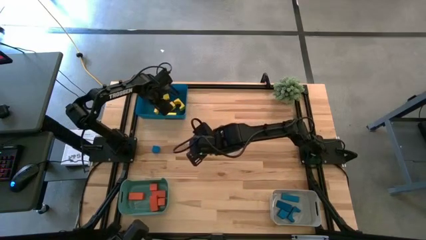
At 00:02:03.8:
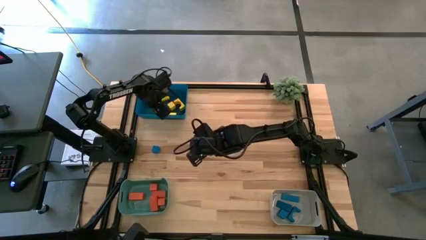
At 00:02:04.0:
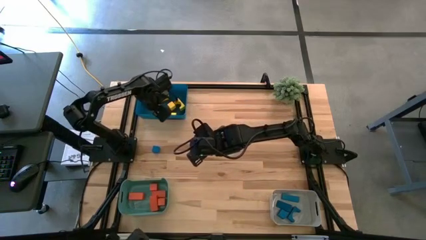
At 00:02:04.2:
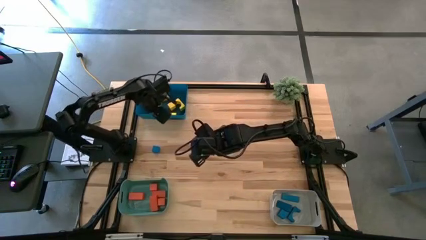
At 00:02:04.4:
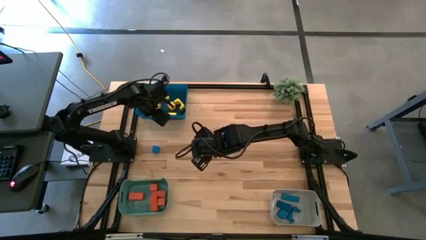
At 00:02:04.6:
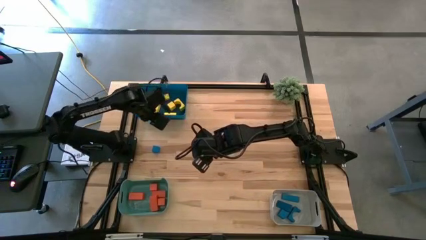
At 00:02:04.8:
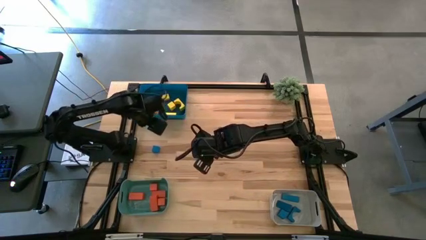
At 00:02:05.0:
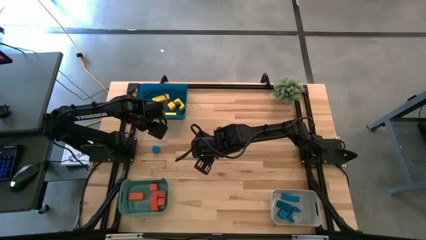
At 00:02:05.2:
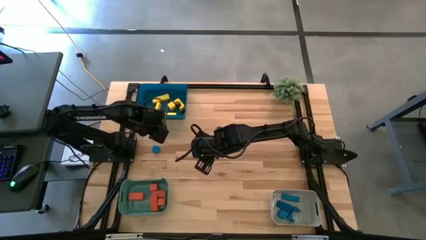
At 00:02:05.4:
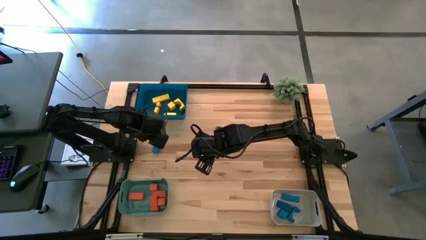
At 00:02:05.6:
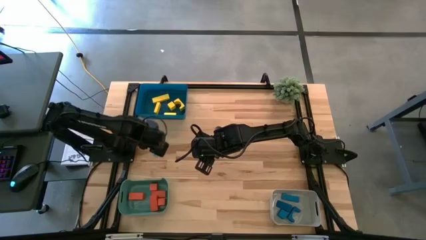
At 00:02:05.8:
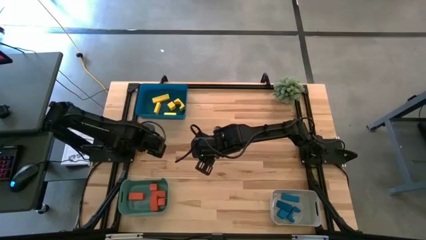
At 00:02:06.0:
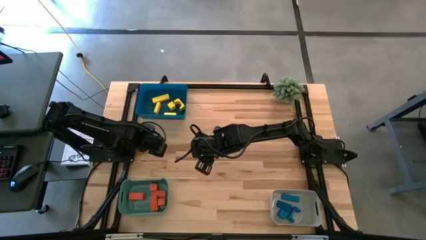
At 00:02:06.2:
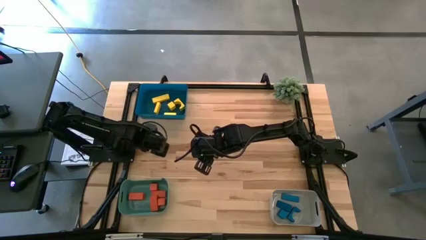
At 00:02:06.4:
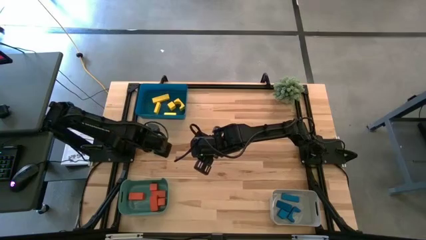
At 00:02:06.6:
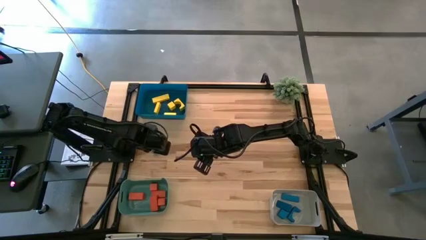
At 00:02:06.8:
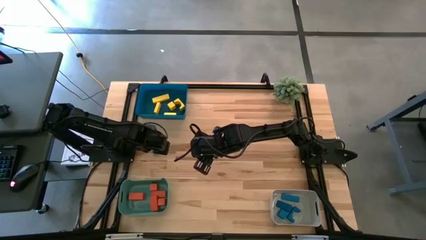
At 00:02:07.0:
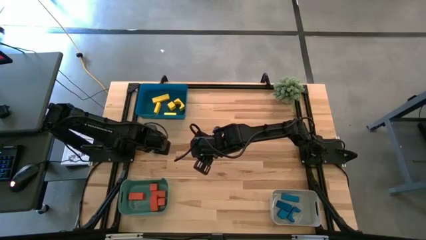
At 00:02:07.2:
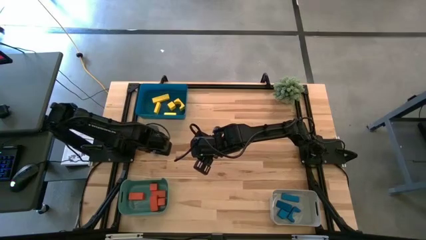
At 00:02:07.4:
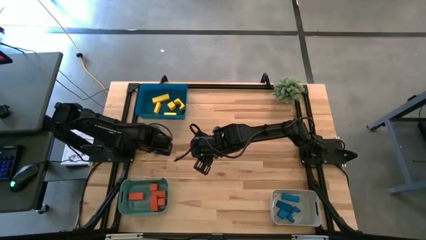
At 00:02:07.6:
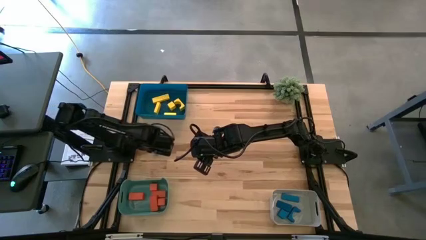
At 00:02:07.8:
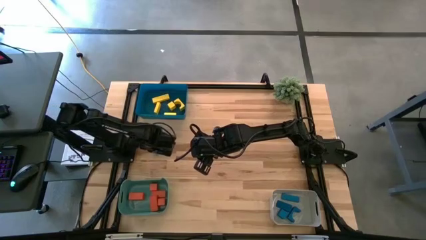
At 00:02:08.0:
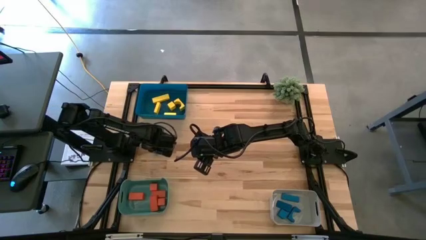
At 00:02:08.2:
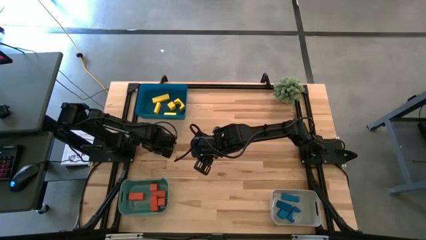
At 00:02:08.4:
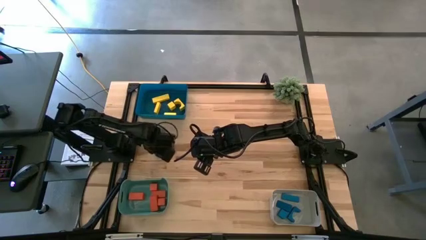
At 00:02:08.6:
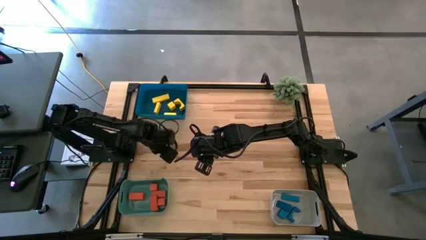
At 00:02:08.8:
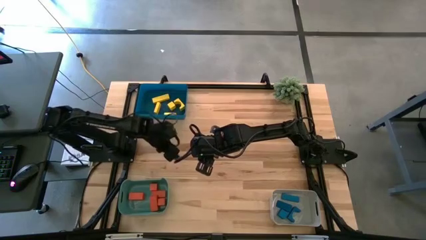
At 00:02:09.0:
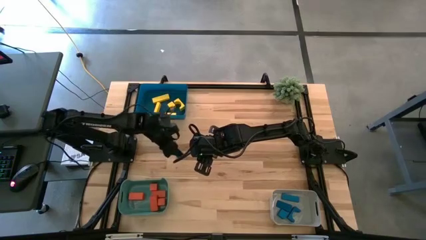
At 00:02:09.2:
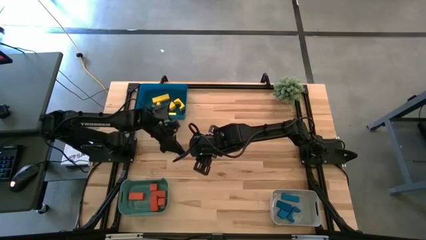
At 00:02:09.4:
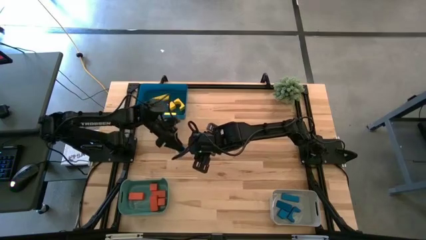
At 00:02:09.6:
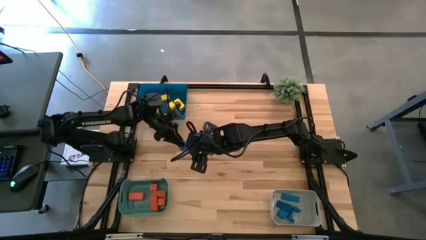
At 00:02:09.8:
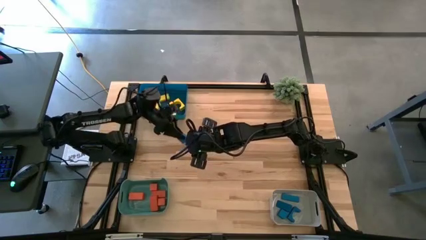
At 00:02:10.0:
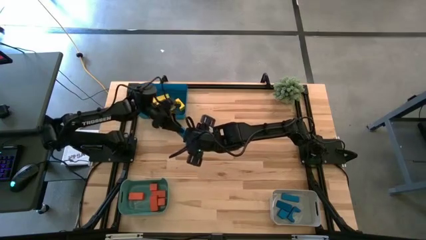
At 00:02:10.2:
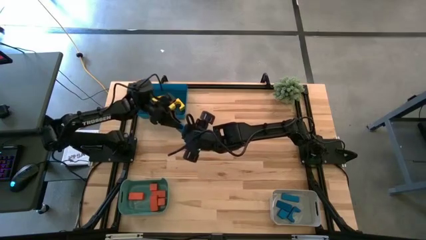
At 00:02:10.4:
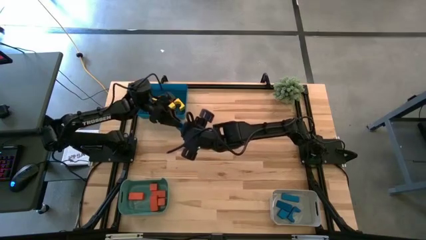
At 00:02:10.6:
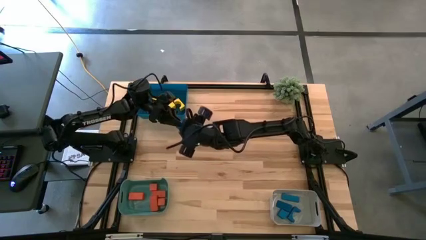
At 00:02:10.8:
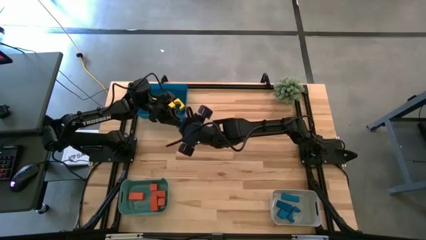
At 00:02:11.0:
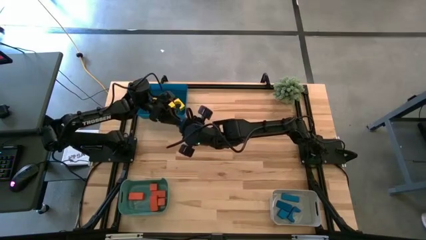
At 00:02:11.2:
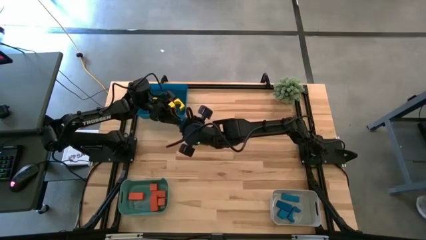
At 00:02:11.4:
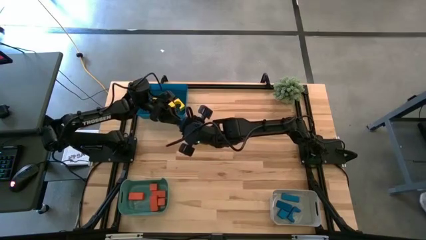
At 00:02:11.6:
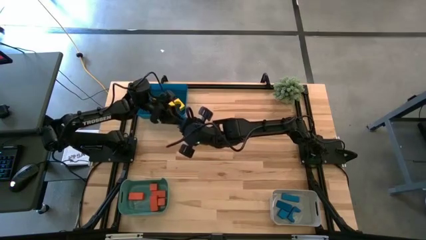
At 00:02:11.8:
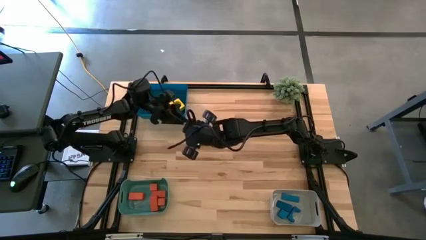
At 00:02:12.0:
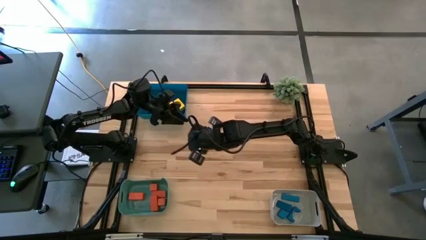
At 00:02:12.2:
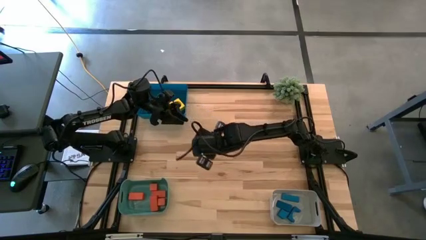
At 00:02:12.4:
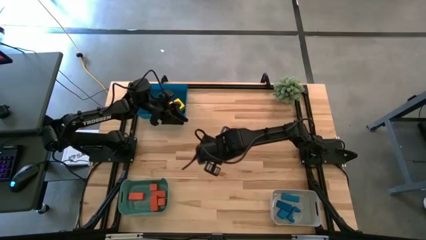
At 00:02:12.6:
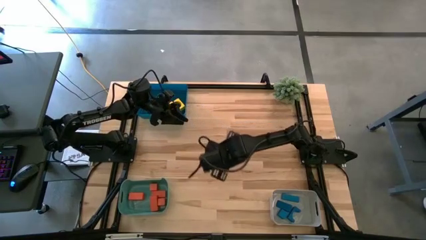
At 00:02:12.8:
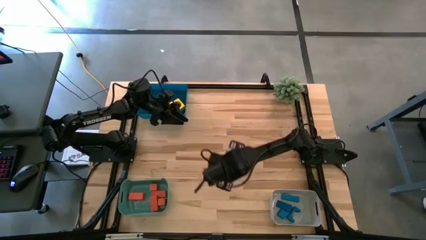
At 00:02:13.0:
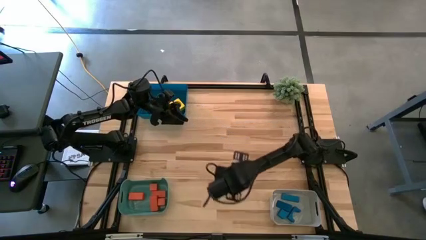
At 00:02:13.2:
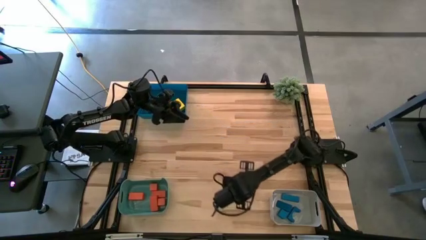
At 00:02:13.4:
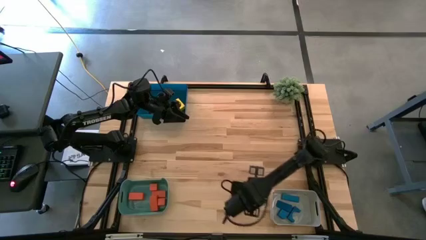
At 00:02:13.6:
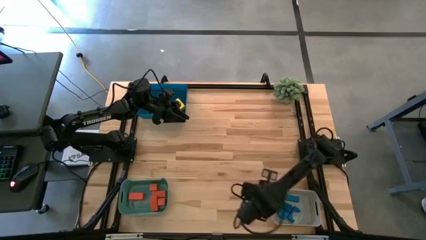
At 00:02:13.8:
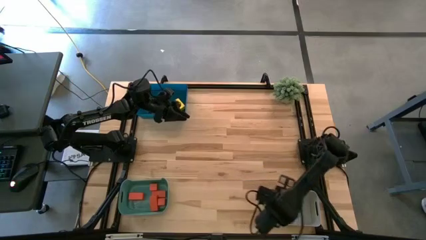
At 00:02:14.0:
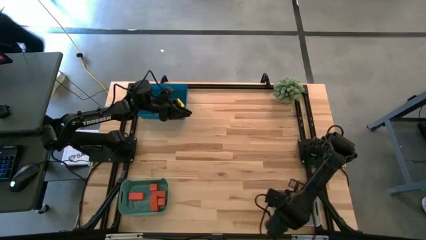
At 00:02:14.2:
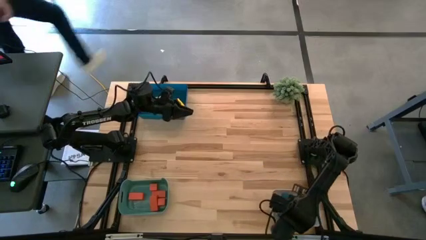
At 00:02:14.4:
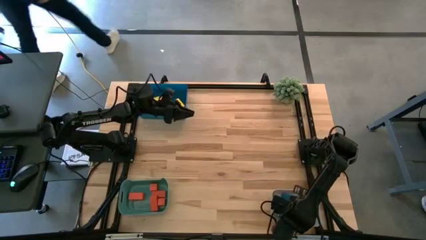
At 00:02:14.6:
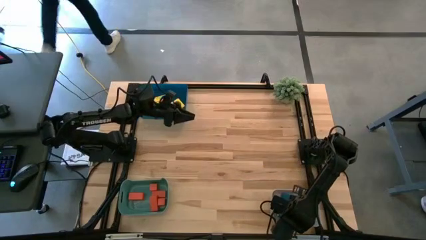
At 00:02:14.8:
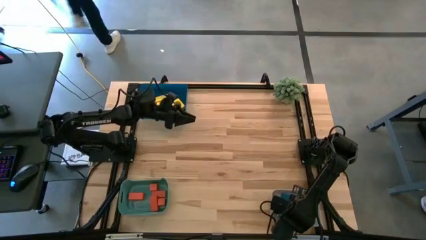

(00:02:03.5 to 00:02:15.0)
Task: Sort & place blocks by color
Put the blue block into the white bin

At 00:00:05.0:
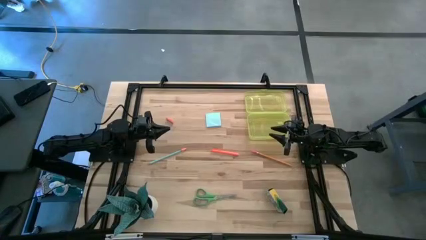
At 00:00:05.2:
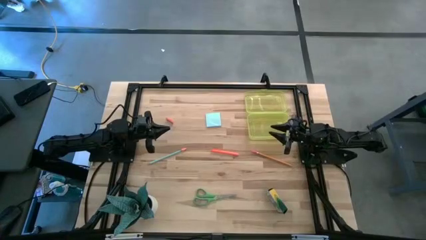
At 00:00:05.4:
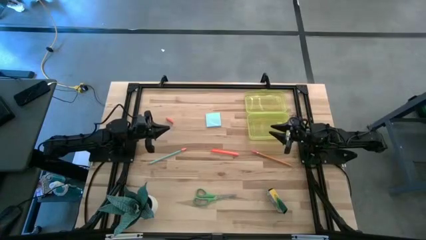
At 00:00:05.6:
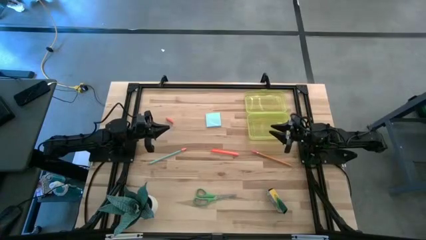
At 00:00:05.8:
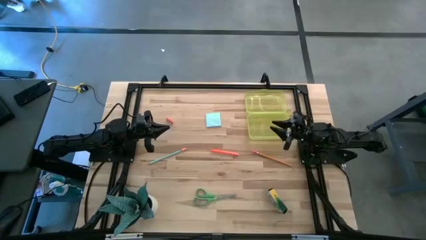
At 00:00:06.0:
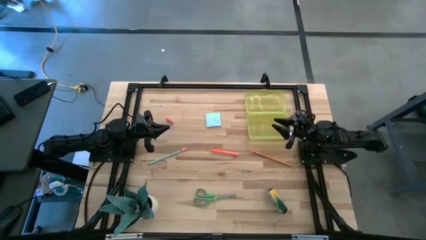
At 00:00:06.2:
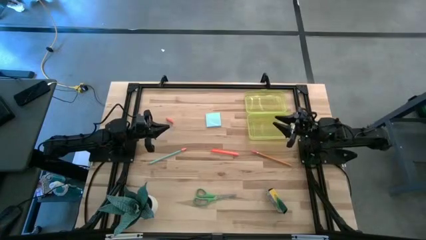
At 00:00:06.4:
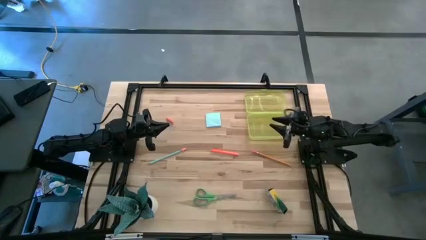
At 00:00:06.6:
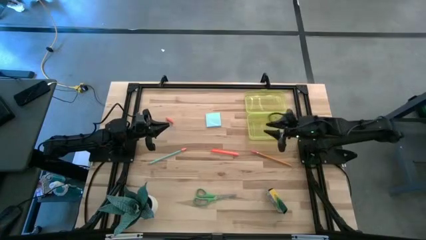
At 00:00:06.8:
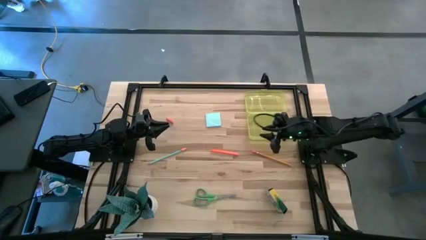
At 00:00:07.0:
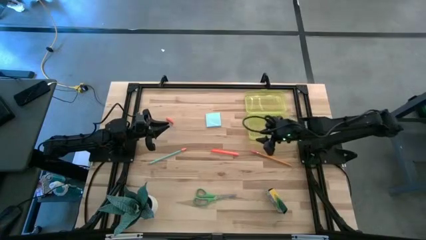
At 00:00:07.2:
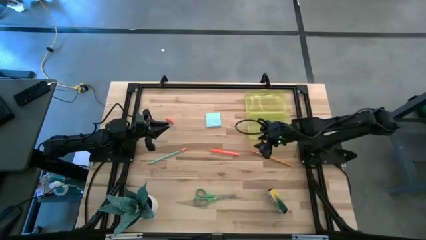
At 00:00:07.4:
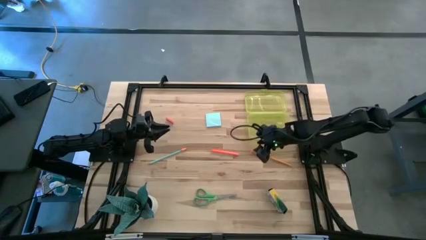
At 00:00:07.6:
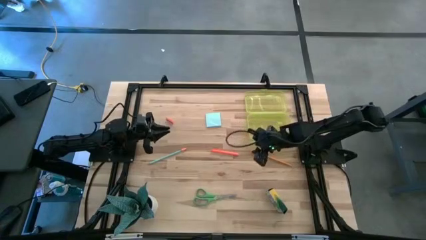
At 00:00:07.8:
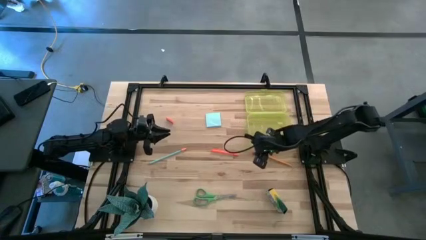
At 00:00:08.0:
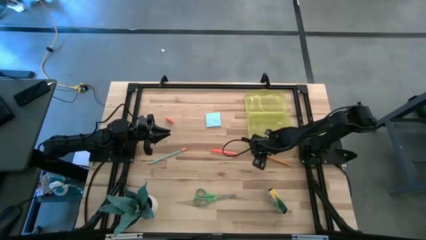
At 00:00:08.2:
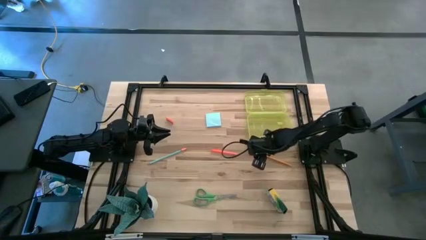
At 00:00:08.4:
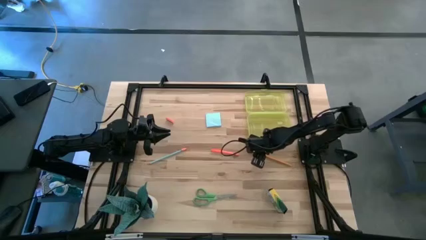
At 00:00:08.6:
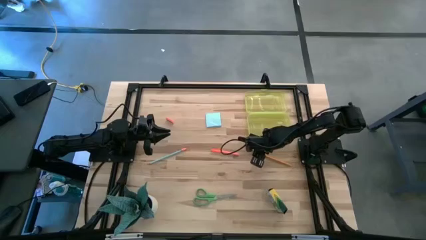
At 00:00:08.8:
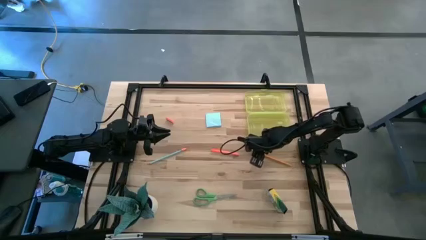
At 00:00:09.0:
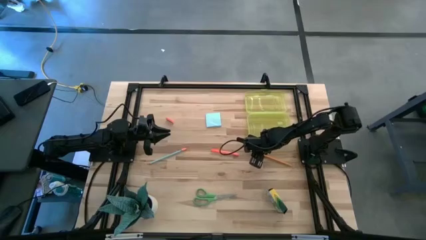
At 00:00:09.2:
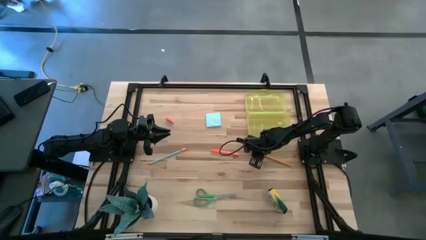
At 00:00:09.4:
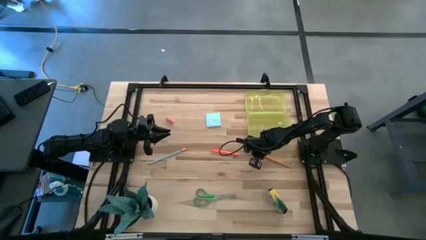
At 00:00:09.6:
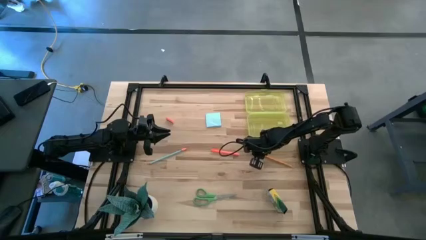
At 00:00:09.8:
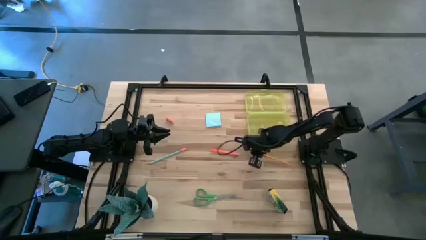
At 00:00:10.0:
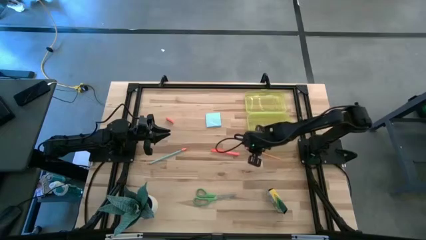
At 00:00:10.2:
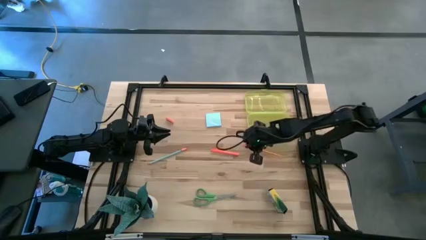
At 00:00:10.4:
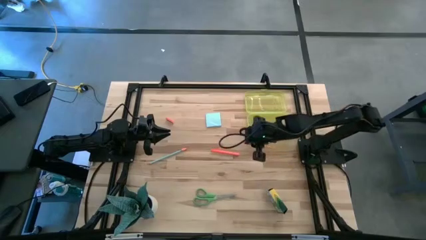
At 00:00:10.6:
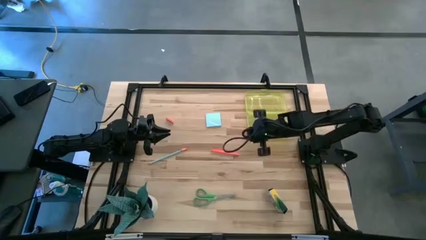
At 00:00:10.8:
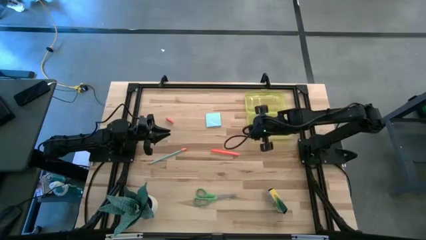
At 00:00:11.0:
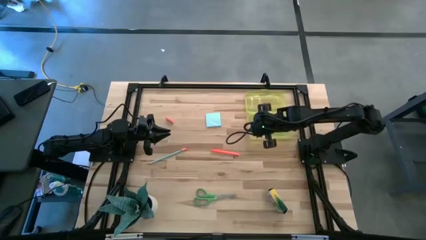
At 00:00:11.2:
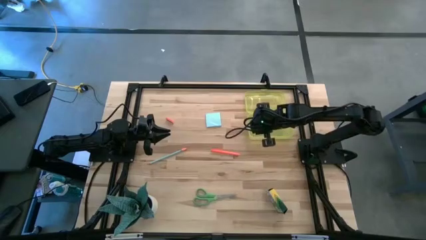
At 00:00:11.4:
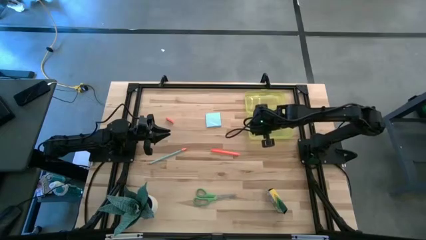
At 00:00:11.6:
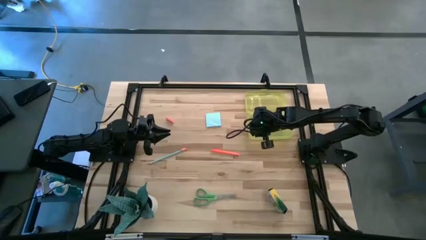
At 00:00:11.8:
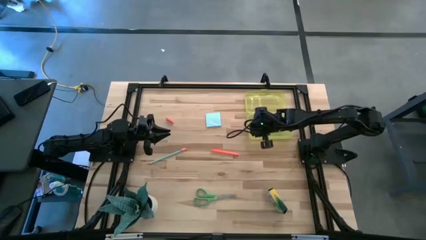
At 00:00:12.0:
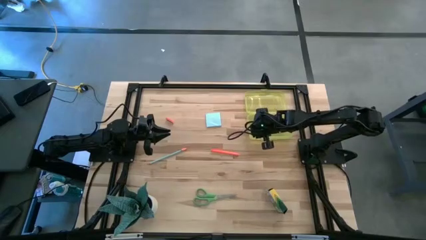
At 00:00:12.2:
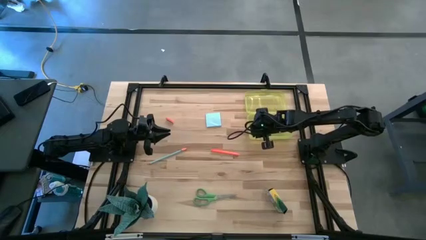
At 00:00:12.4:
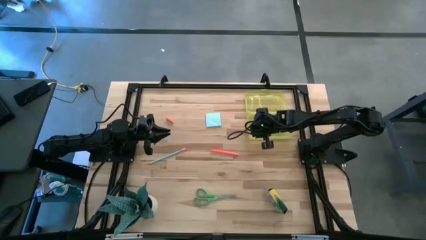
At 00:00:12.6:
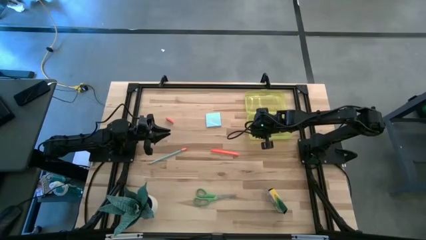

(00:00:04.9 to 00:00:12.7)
Task: Pack school essentials
Put the yellow pencil into the yellow storage box
